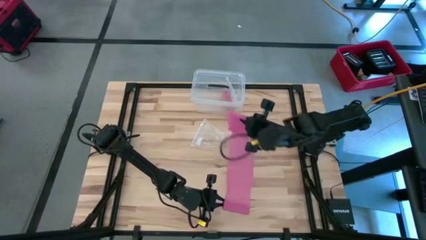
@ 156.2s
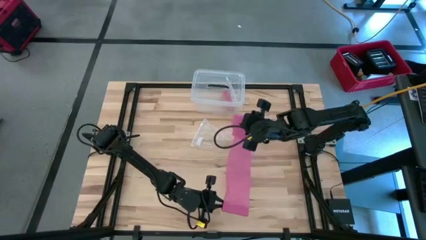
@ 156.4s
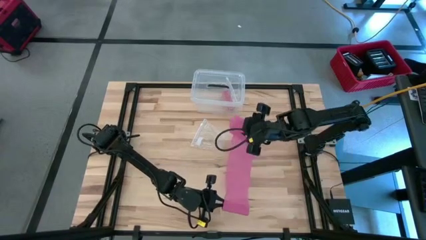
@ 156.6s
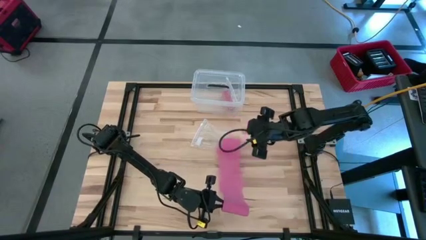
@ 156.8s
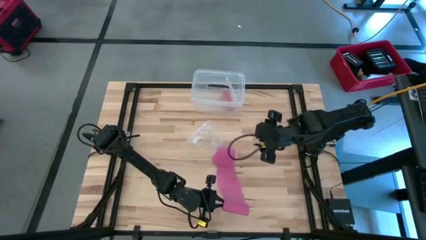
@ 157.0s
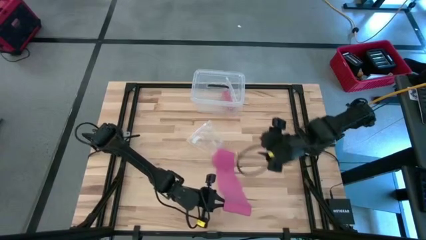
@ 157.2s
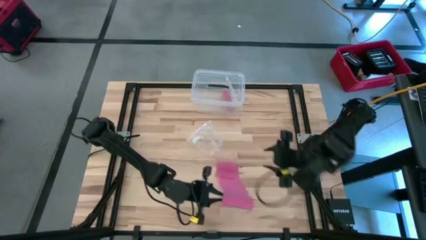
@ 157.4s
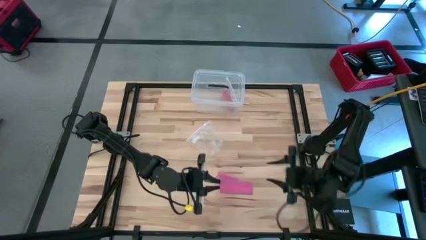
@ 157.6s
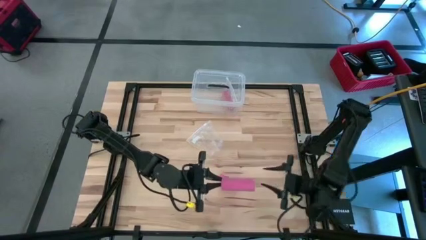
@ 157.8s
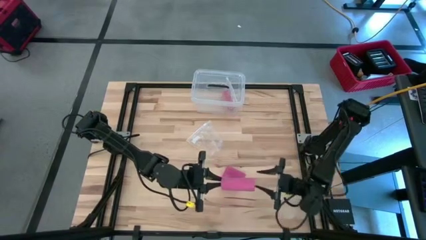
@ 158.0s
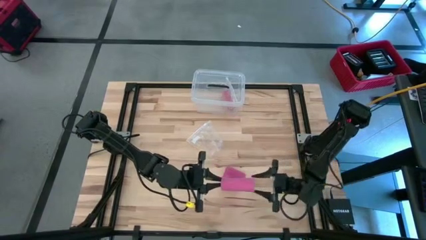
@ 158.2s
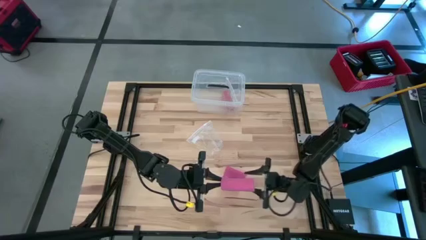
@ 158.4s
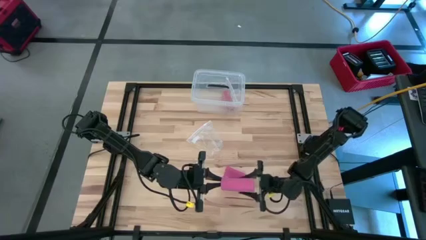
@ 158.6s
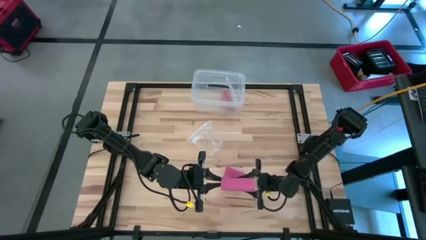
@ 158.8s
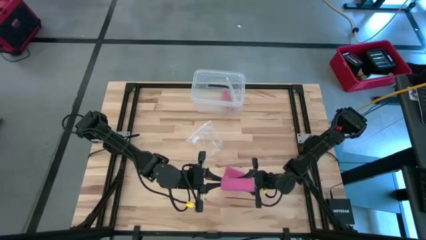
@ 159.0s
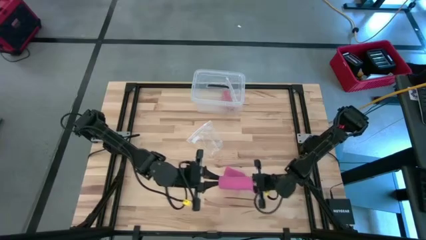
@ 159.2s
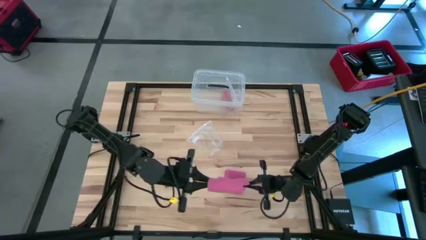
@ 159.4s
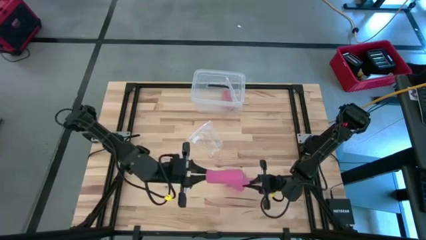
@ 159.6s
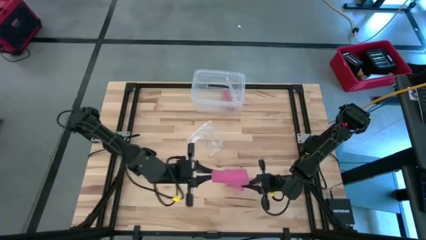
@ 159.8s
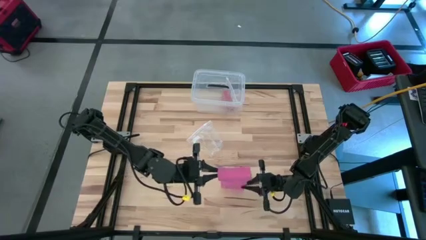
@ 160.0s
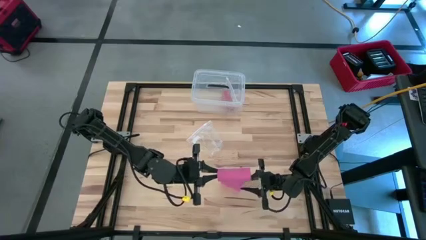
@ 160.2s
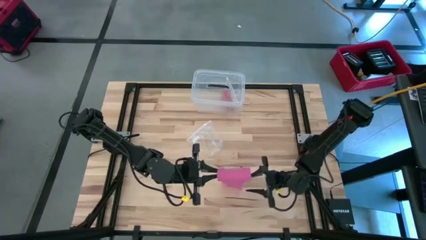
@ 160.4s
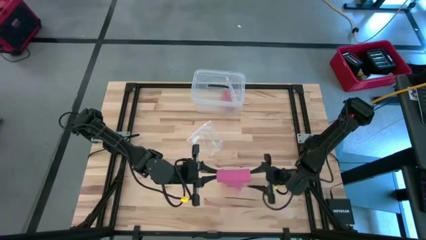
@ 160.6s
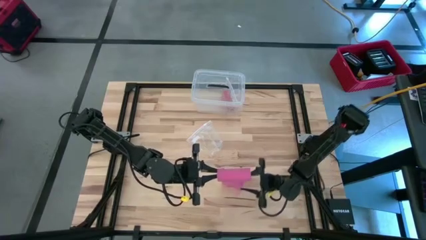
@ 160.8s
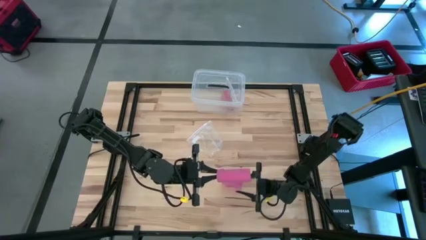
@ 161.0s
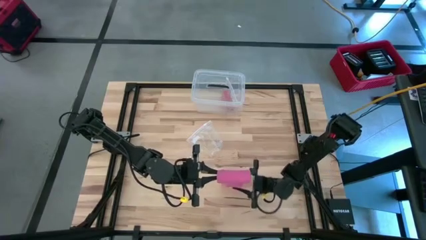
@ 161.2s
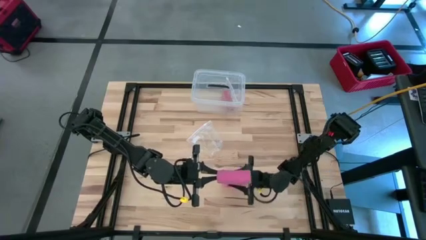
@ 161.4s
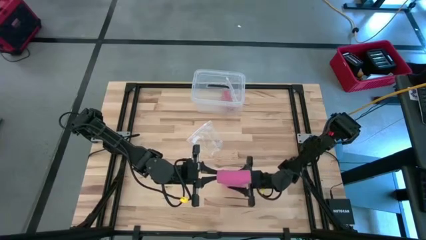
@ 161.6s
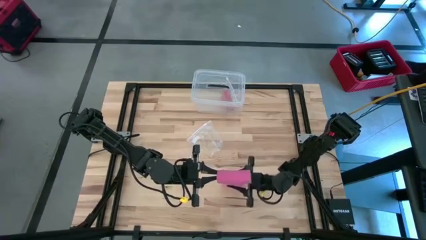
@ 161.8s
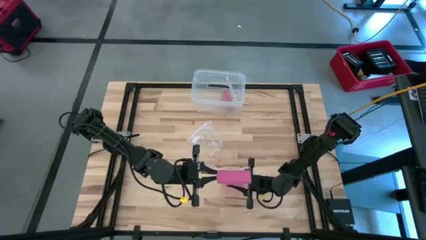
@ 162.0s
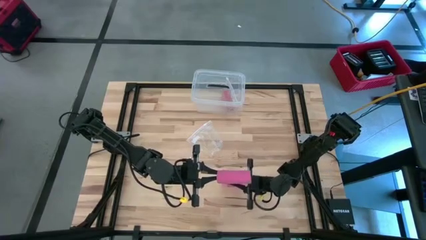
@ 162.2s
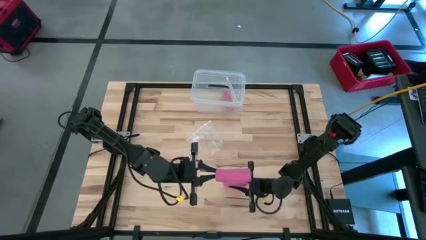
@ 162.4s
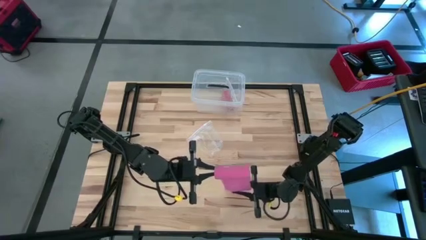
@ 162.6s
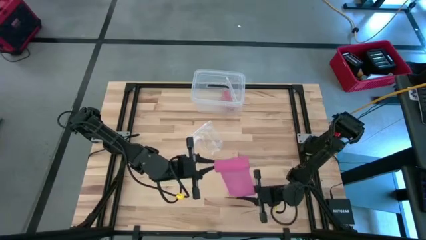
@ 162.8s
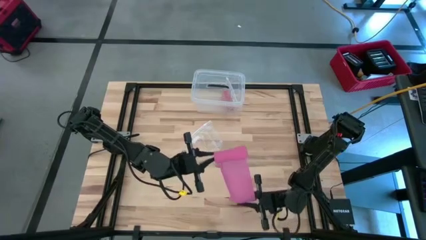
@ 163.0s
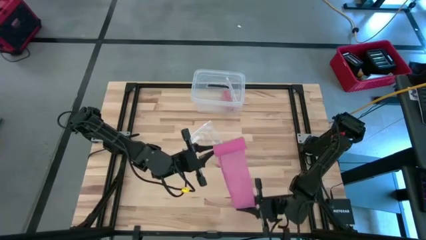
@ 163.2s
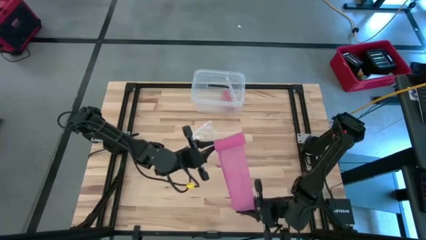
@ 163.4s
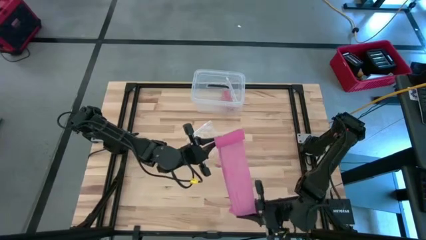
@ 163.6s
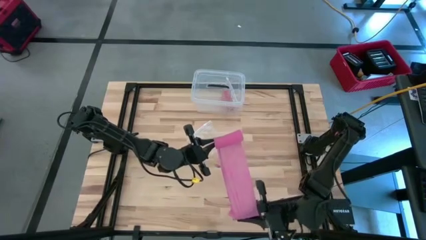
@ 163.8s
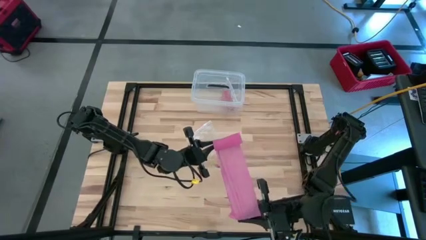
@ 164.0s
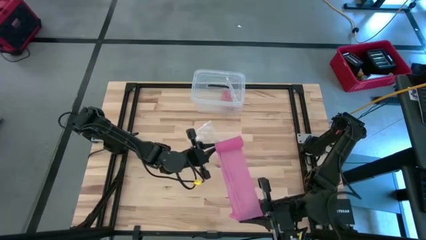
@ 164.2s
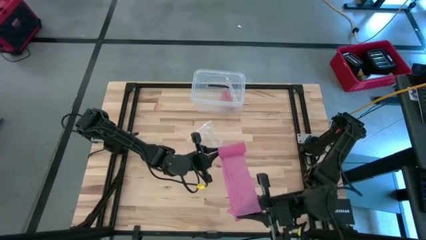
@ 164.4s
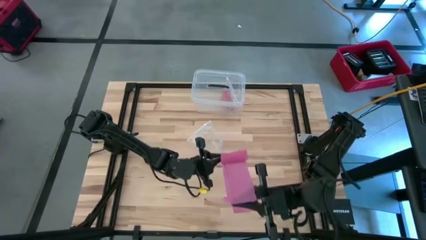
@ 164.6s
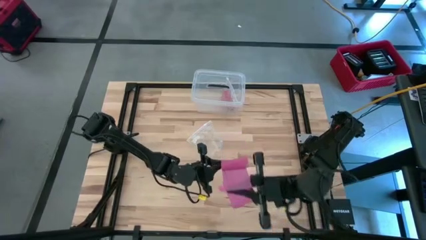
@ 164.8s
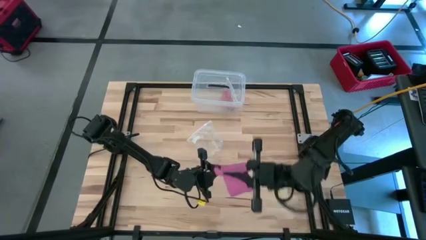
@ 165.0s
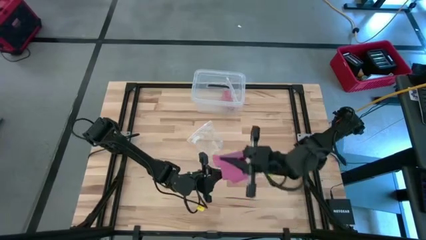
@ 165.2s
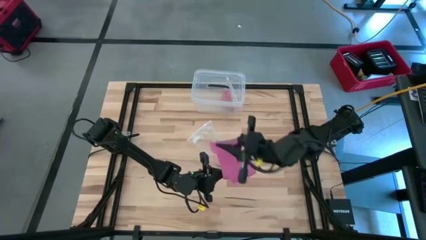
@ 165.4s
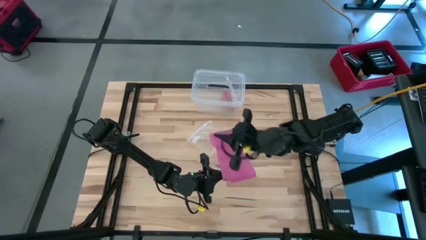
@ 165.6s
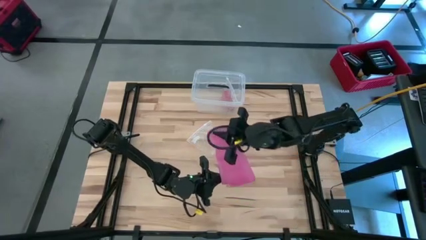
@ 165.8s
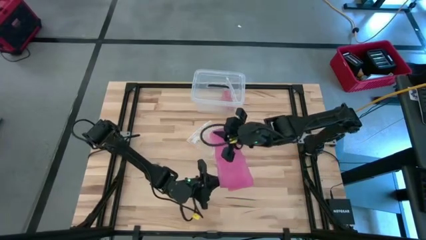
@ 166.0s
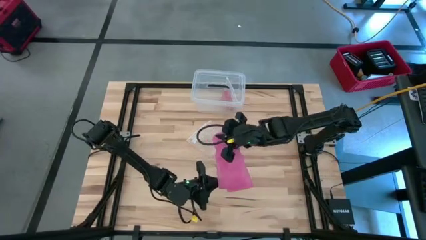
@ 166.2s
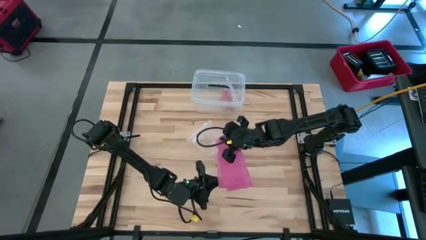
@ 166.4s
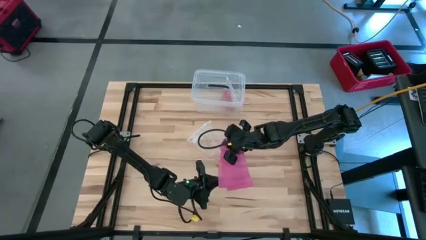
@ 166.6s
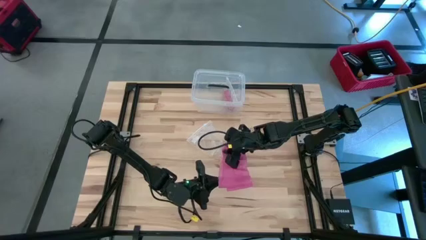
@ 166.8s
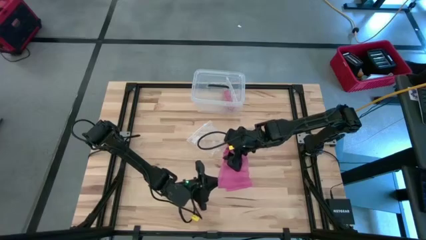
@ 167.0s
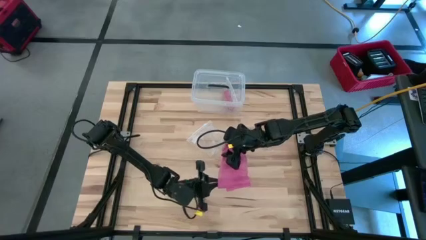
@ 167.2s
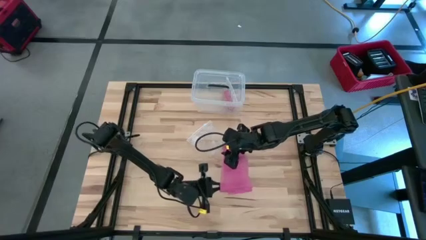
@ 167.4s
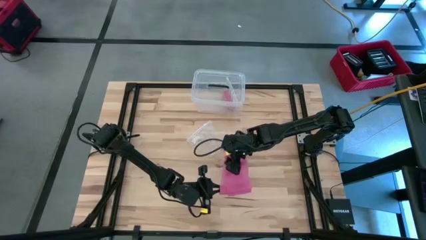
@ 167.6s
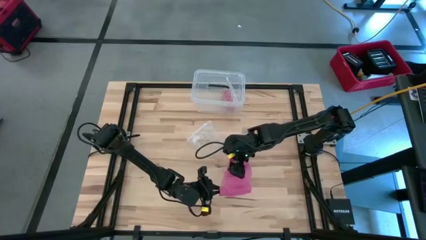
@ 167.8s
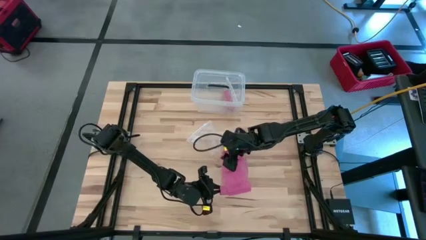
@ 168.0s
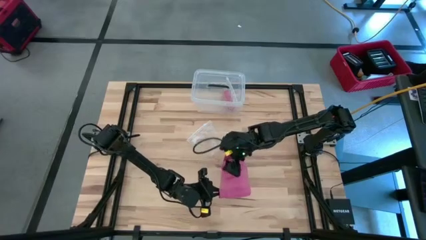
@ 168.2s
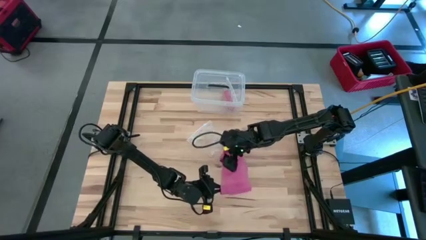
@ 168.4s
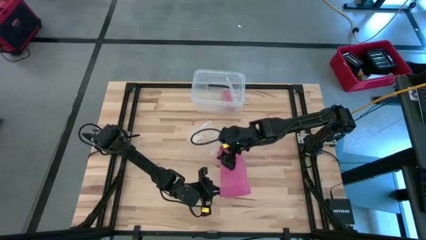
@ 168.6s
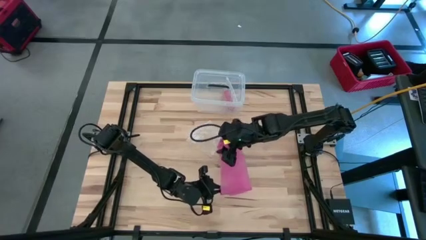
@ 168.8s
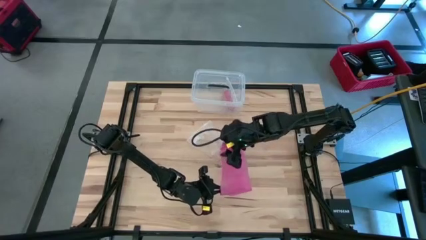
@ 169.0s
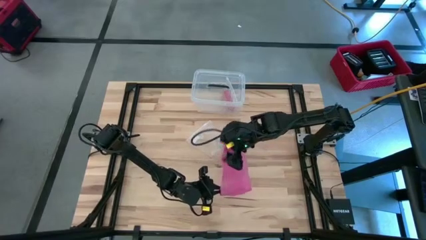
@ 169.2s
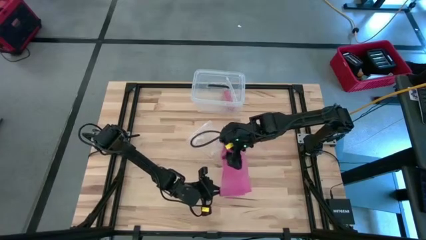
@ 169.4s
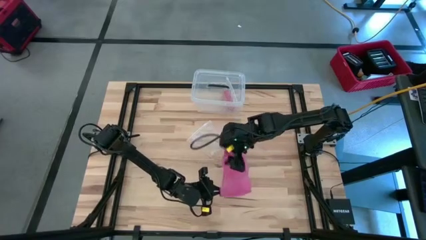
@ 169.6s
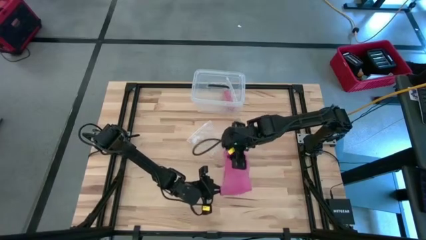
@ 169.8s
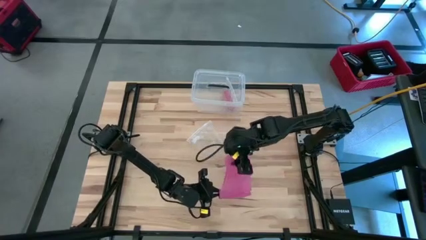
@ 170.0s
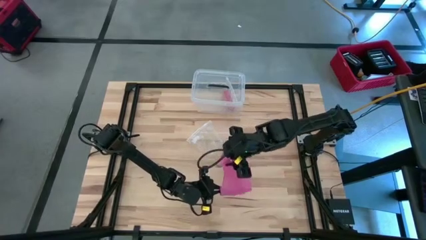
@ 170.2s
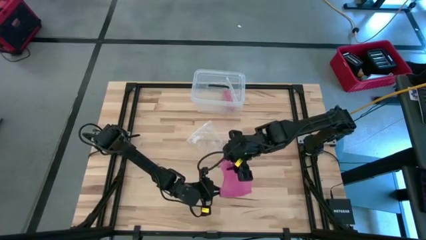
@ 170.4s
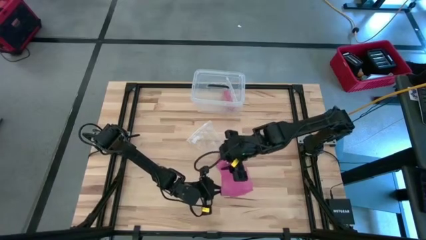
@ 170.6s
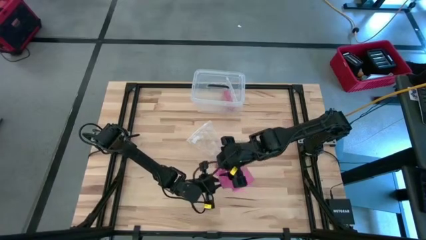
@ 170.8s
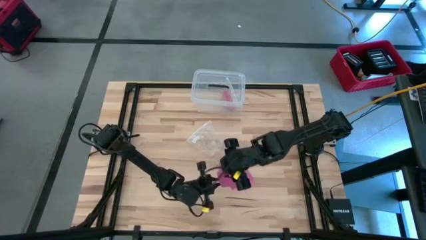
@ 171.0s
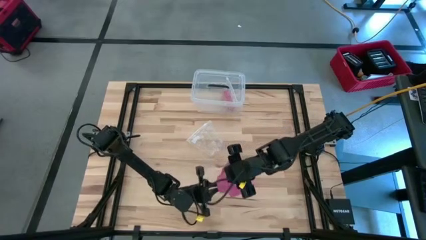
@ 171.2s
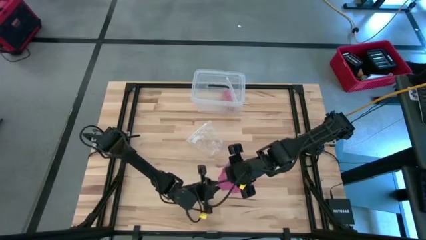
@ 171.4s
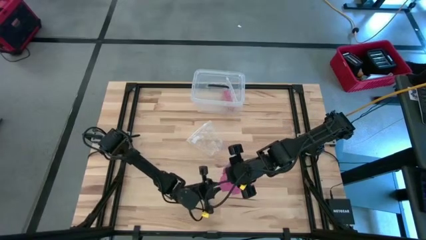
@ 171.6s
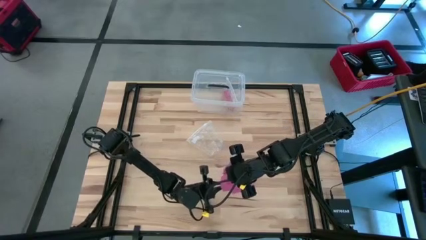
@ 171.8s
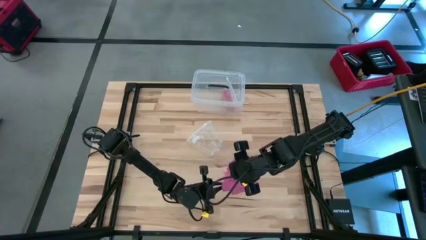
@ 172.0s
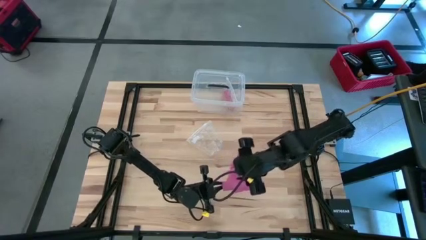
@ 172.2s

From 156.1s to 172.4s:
Task: Roll bandage
Roll the pink bandage
